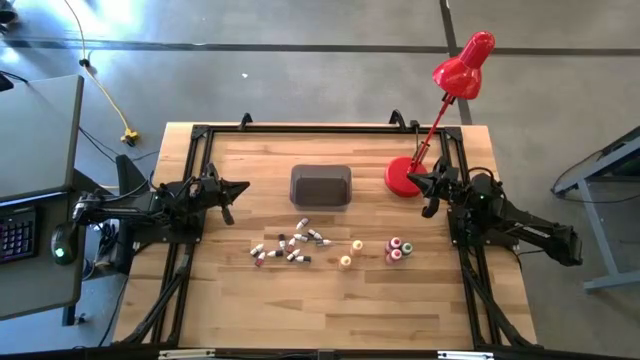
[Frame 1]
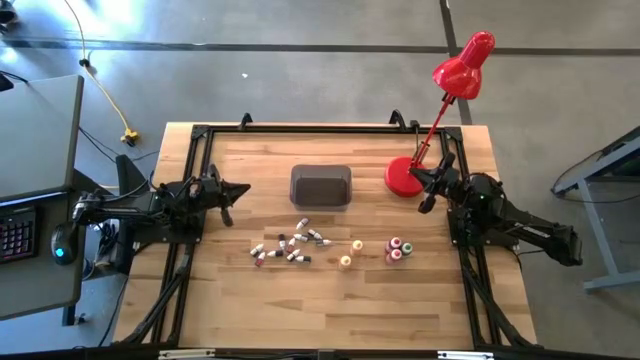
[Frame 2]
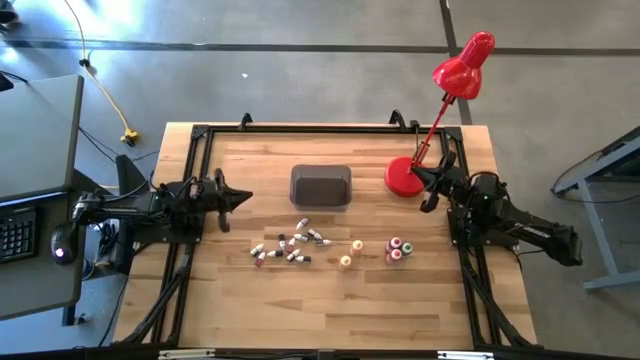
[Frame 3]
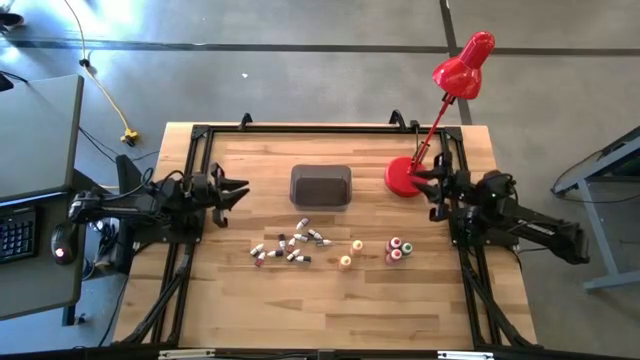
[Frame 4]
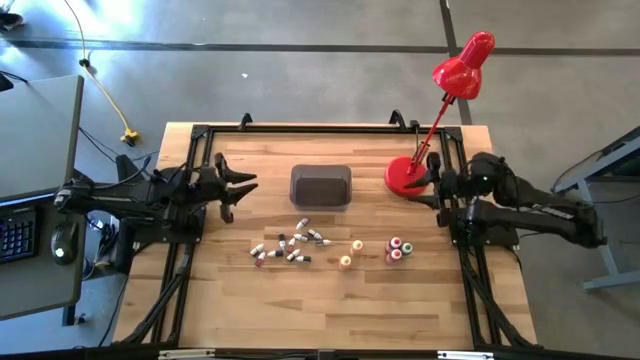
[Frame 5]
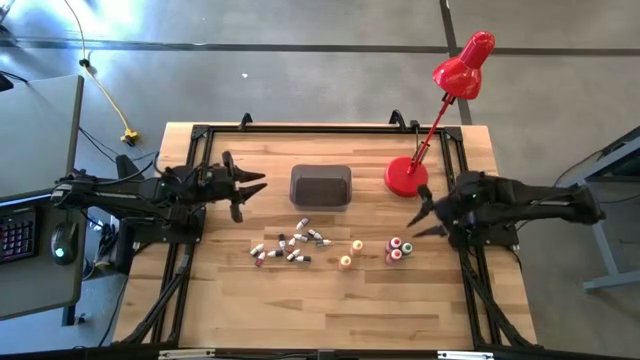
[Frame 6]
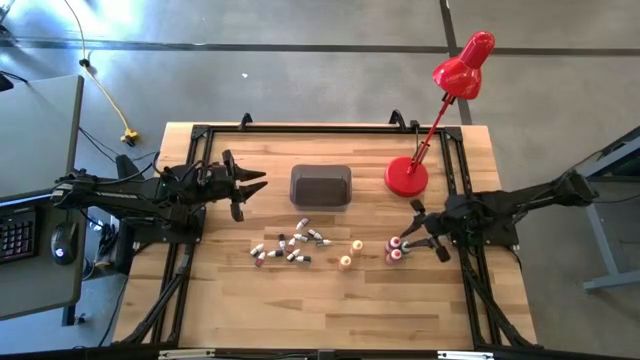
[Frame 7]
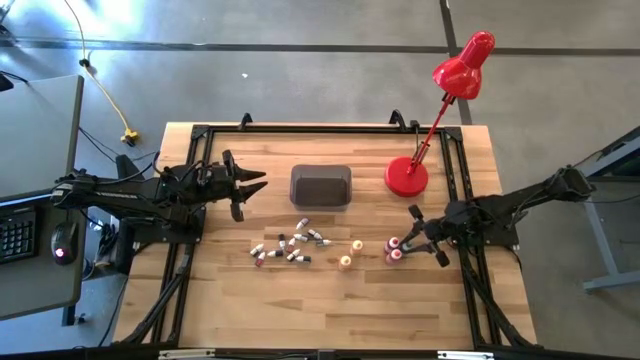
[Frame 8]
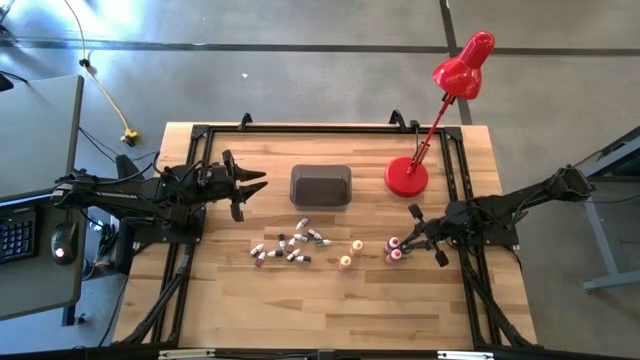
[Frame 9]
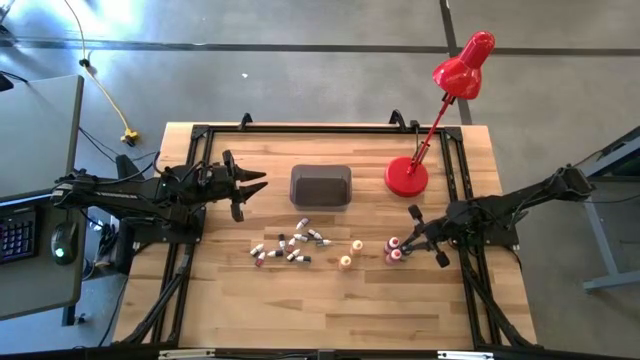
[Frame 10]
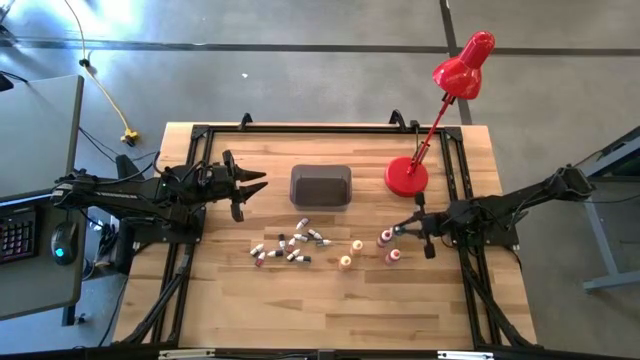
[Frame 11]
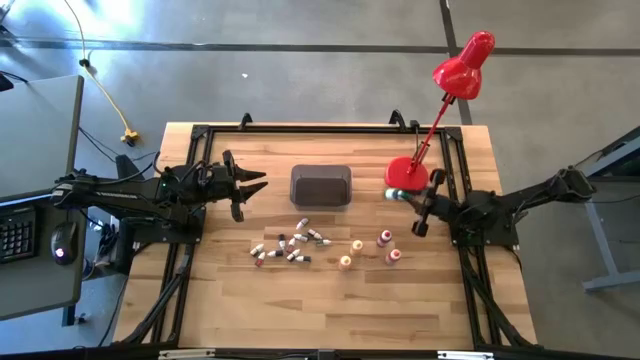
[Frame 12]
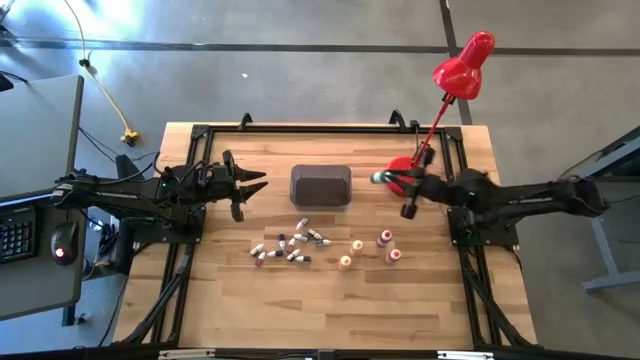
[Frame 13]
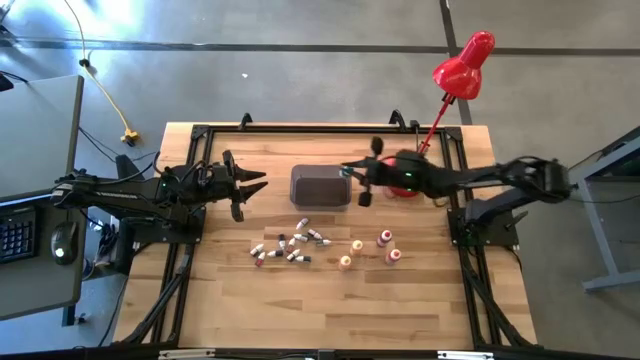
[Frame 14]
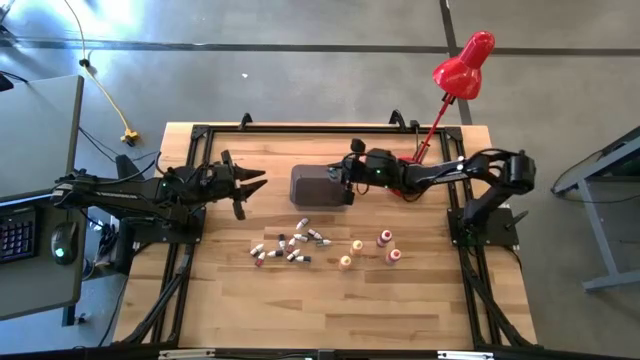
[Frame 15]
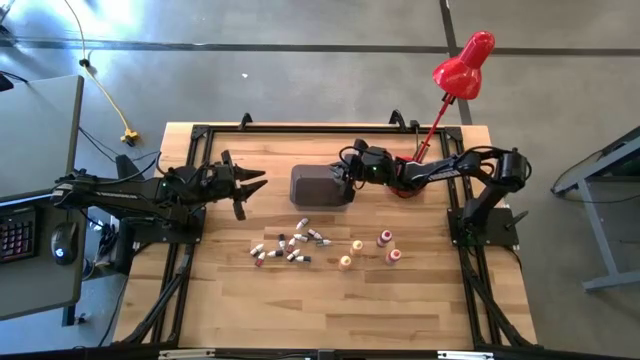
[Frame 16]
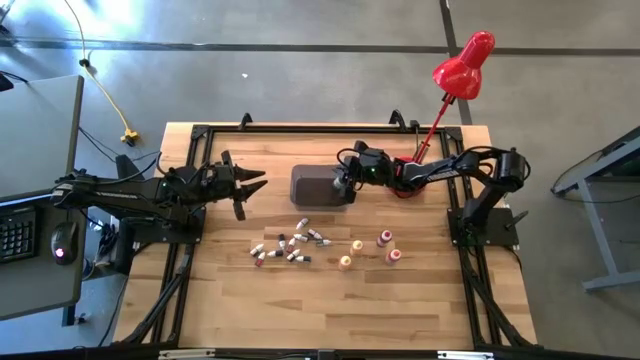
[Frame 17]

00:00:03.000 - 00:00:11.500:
Task: Pick & Place food coloring
Put the big green food coloring bottle into the black bin

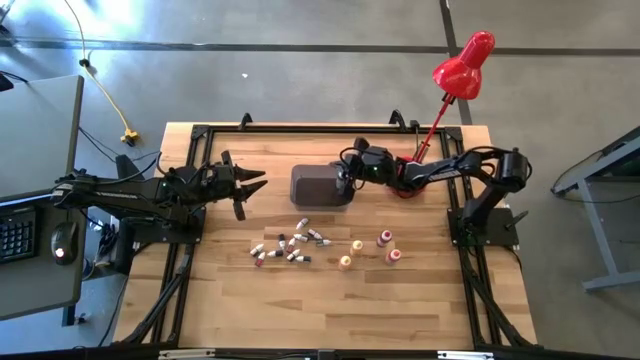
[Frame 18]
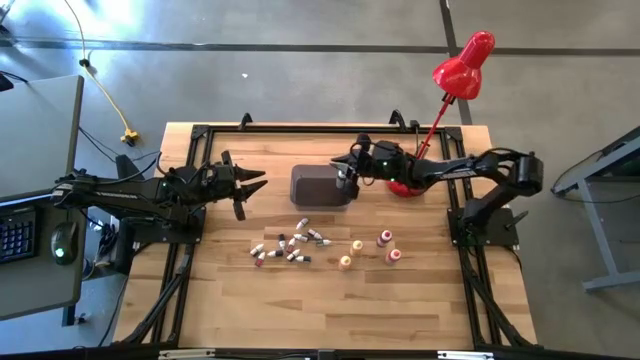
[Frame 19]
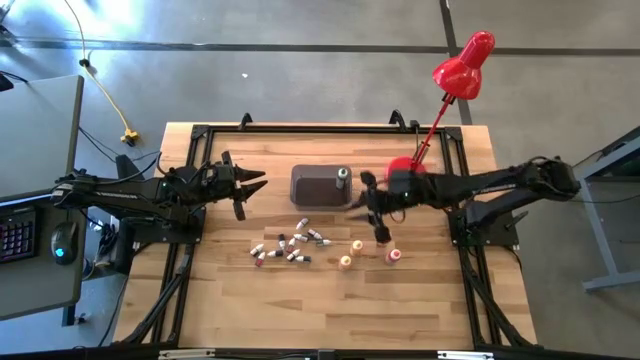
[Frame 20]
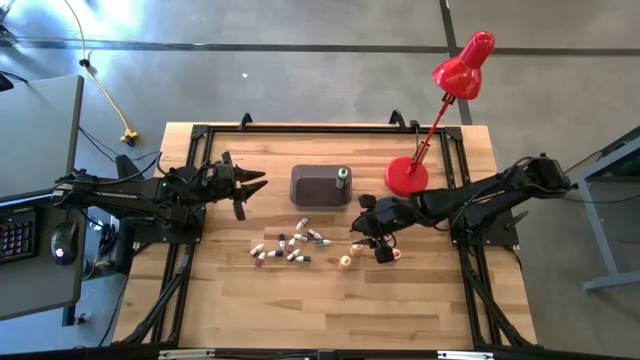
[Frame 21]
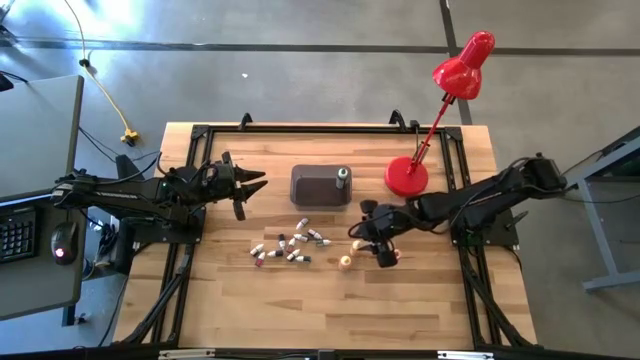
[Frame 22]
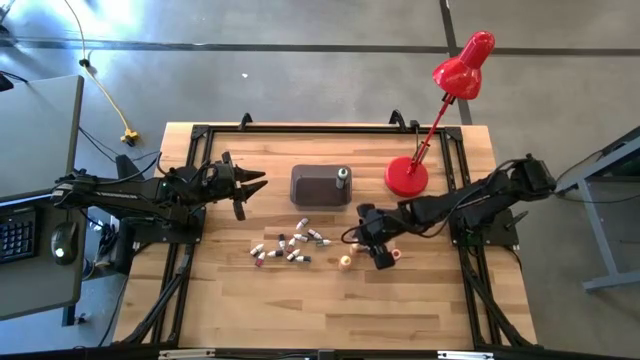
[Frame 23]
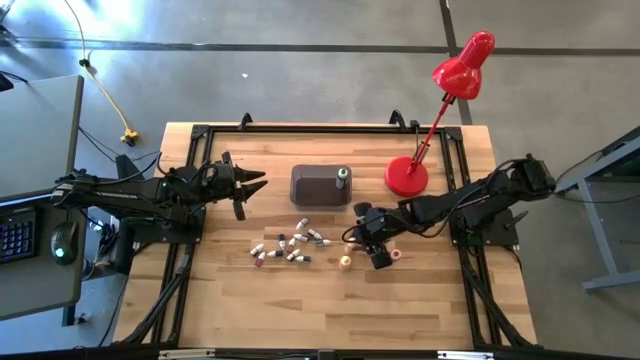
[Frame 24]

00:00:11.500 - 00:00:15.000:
Put the big yellow food coloring bottle into the black bin

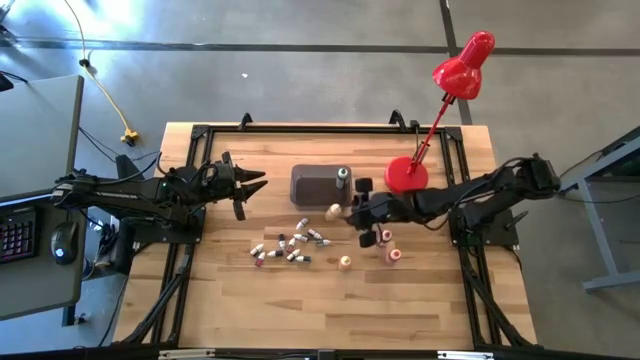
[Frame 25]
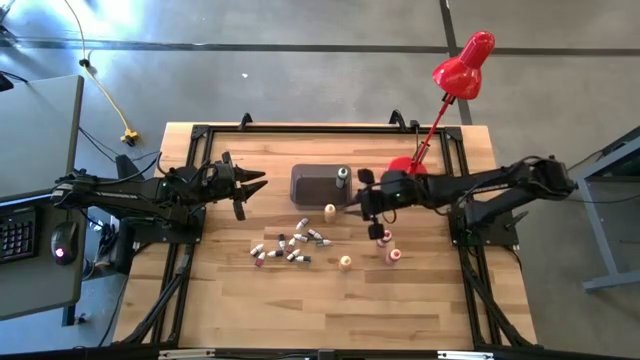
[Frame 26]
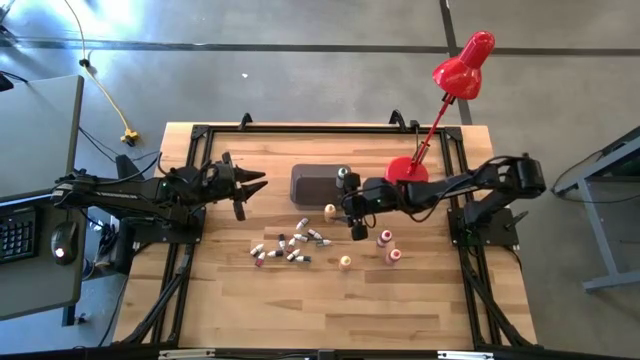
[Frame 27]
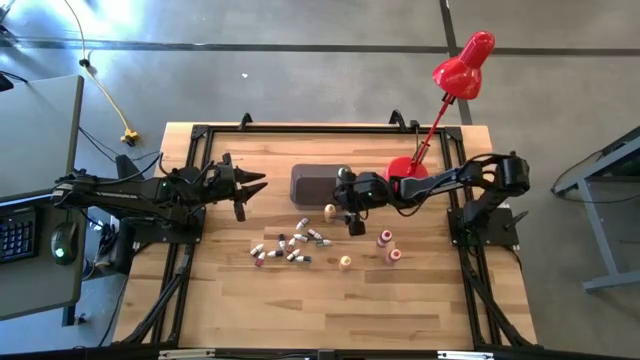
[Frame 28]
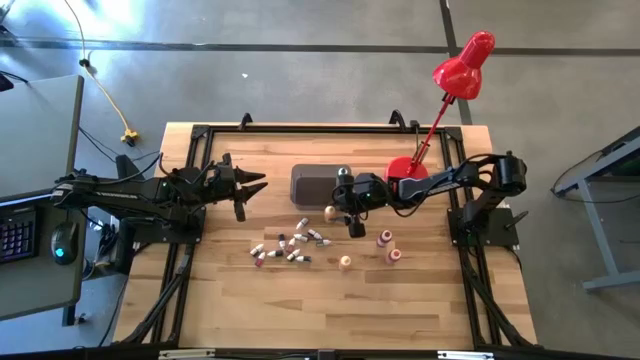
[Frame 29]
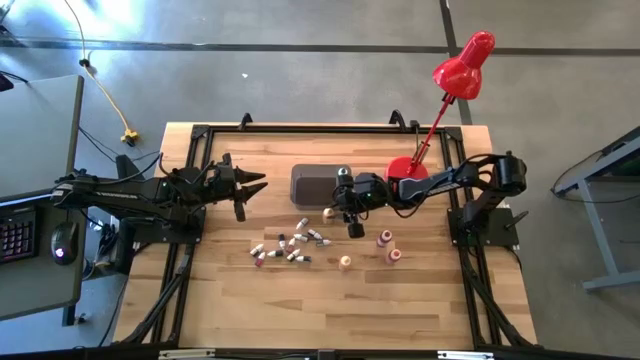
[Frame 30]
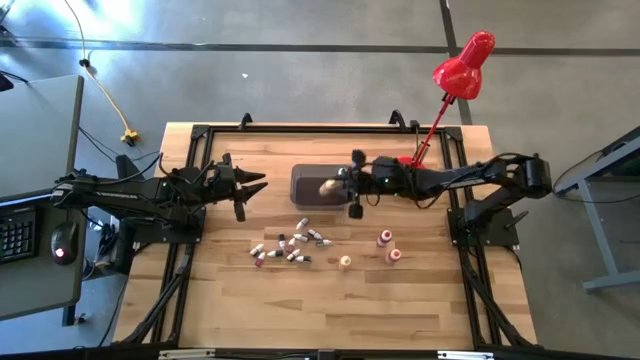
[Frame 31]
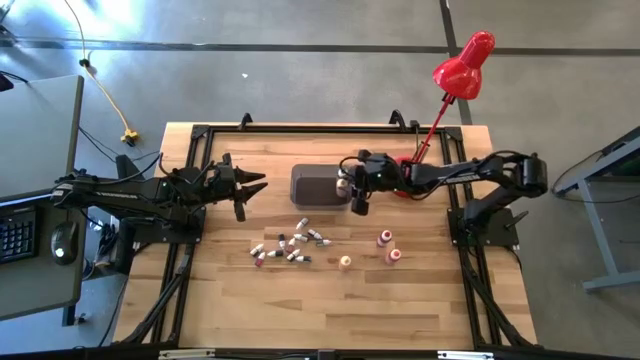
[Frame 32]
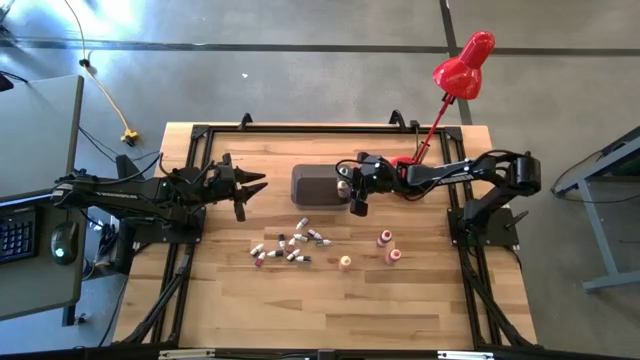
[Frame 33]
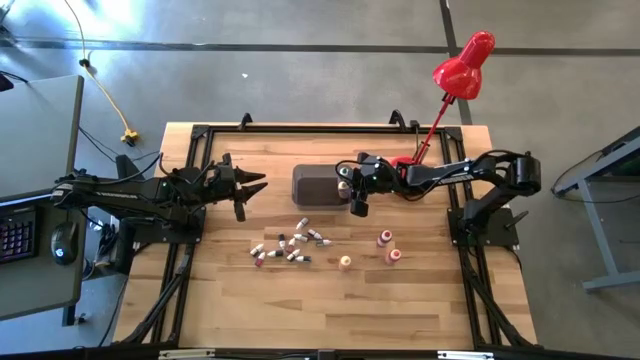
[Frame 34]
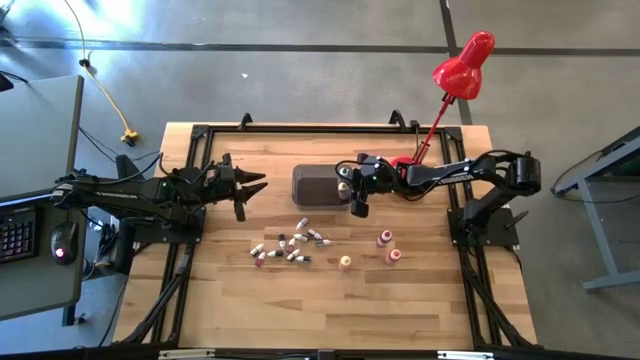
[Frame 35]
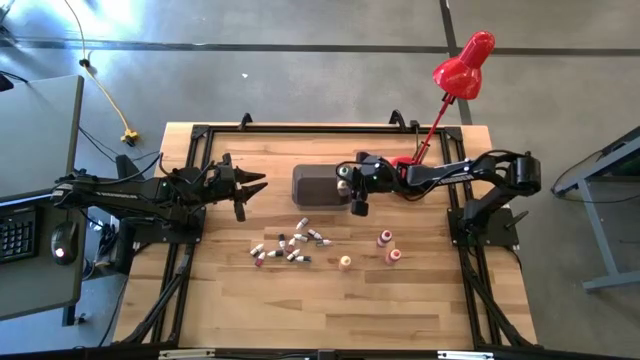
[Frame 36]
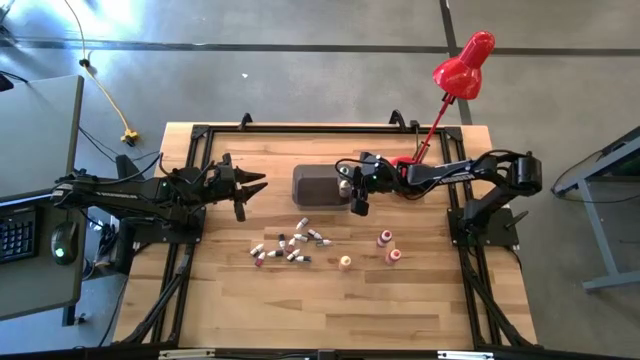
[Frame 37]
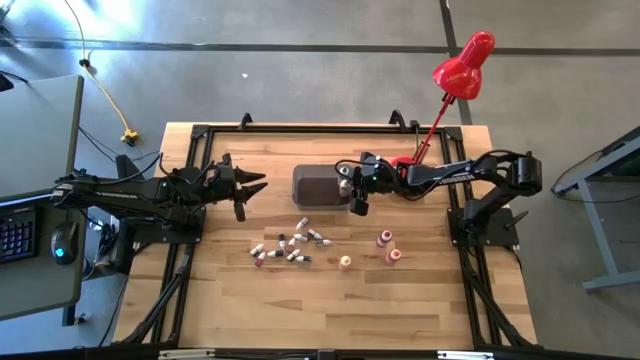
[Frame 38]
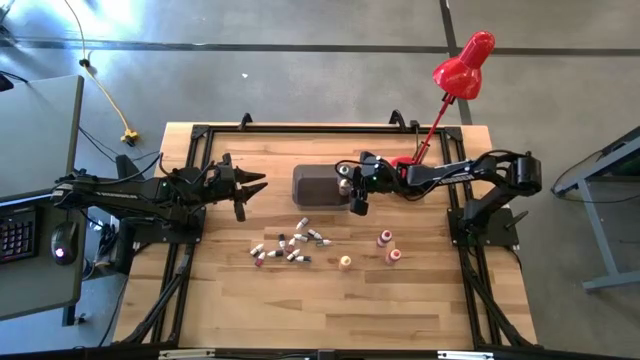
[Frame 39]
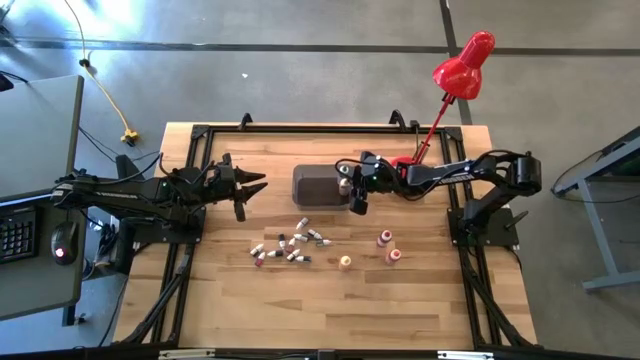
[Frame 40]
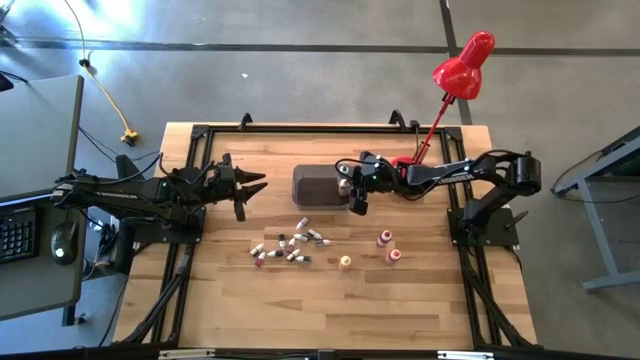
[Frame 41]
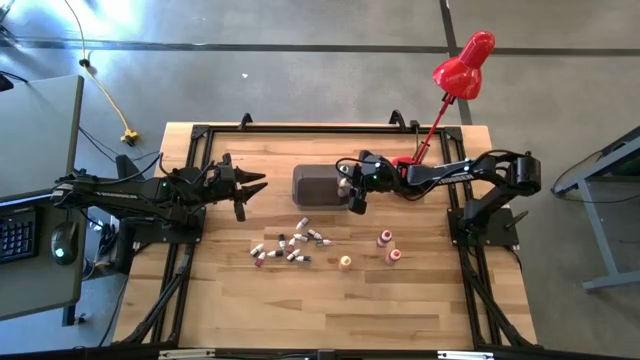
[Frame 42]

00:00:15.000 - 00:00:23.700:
Put the big yellow food coloring bottle into the black bin
